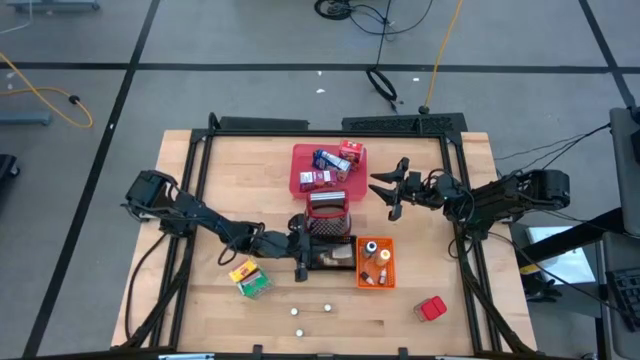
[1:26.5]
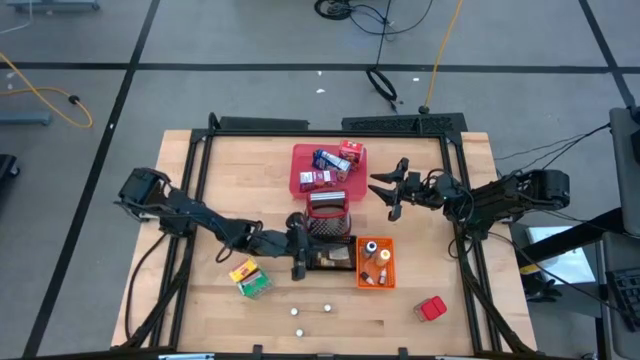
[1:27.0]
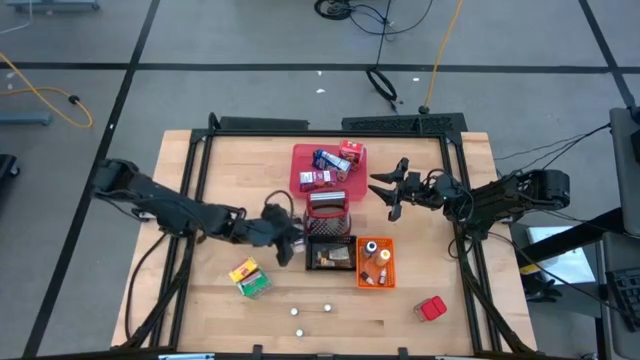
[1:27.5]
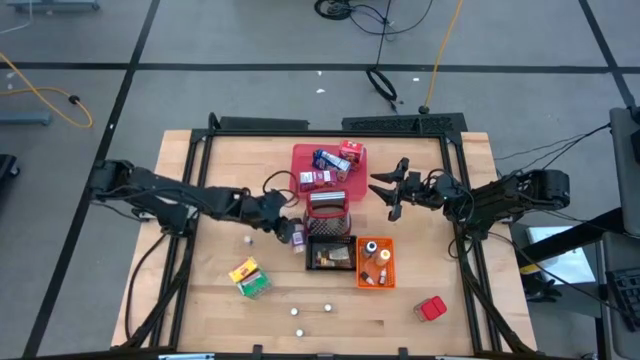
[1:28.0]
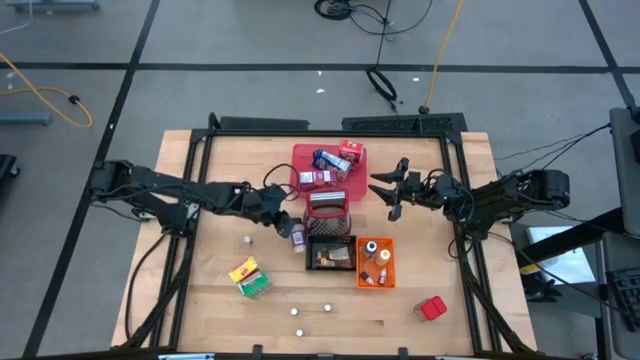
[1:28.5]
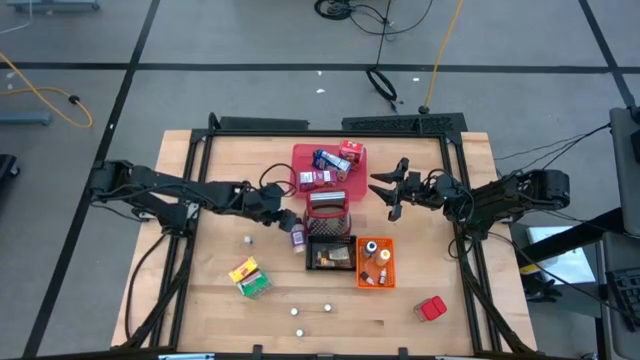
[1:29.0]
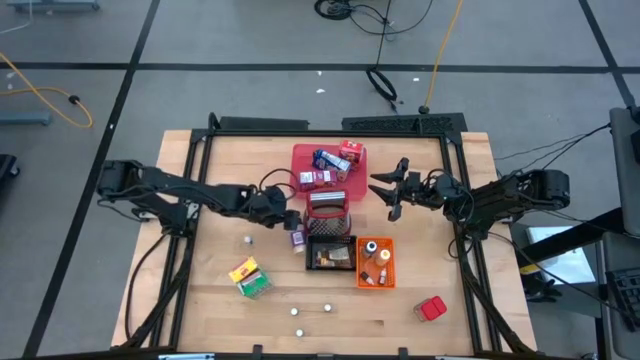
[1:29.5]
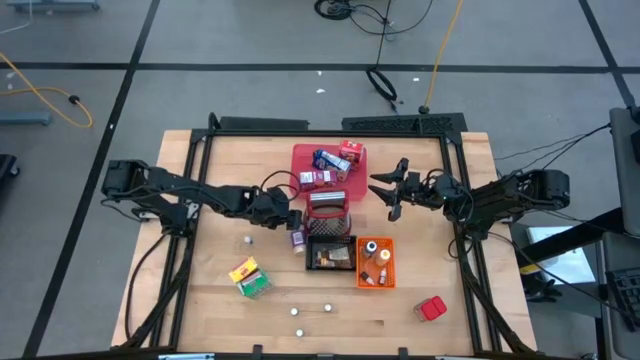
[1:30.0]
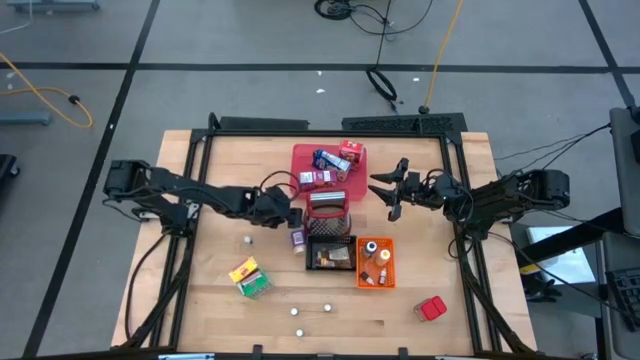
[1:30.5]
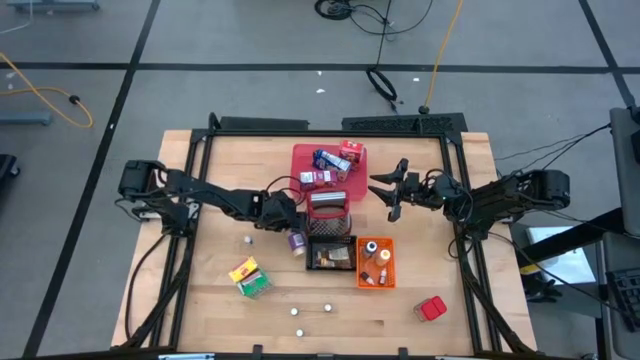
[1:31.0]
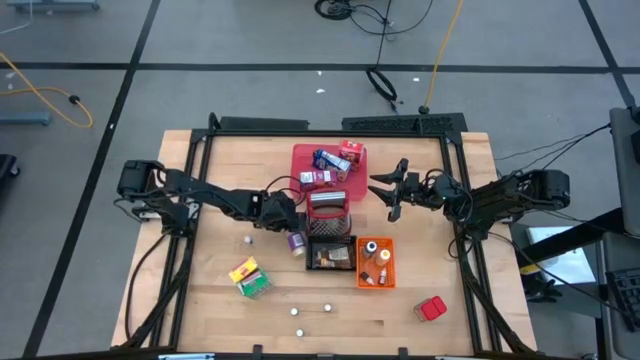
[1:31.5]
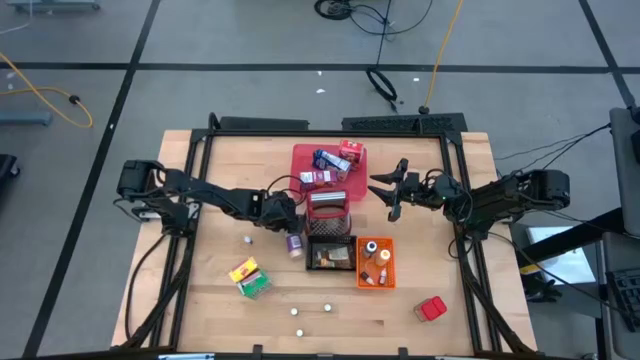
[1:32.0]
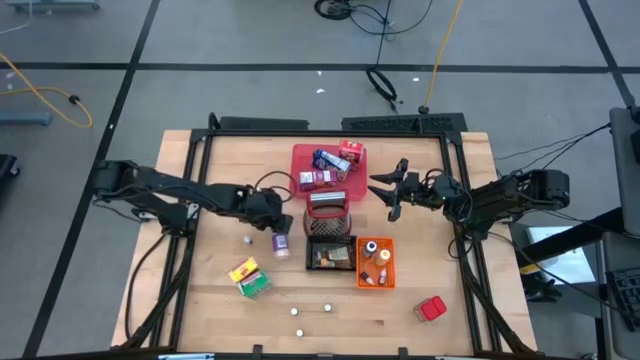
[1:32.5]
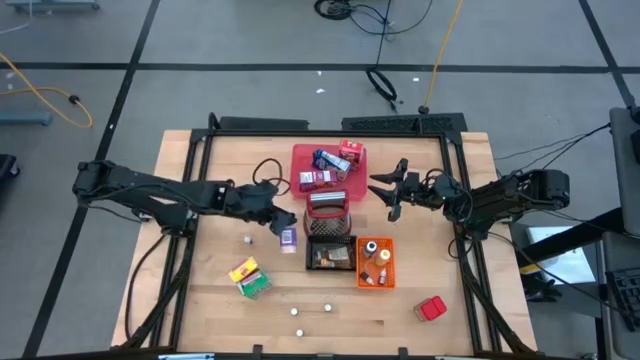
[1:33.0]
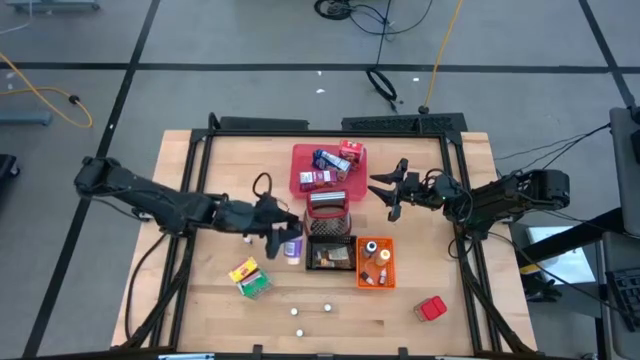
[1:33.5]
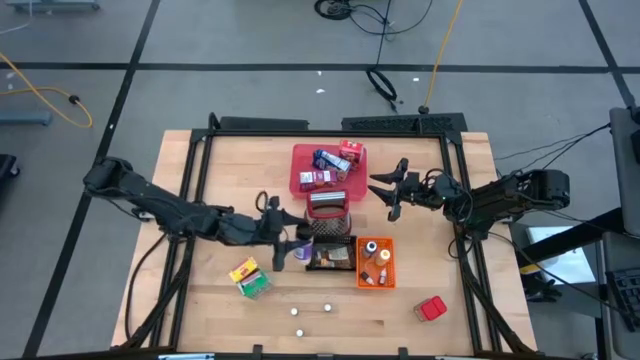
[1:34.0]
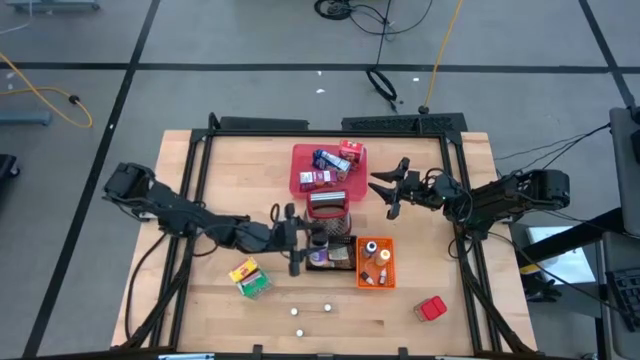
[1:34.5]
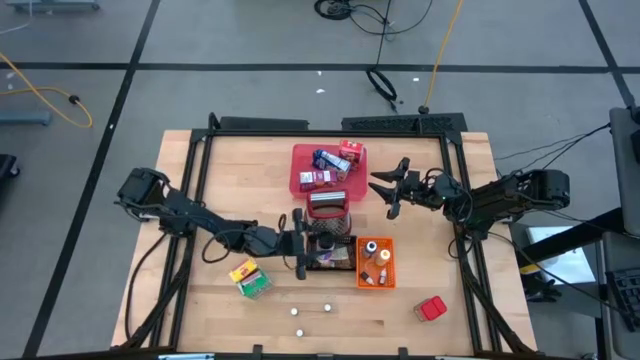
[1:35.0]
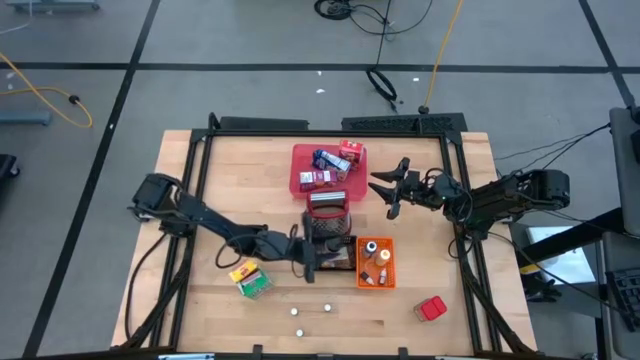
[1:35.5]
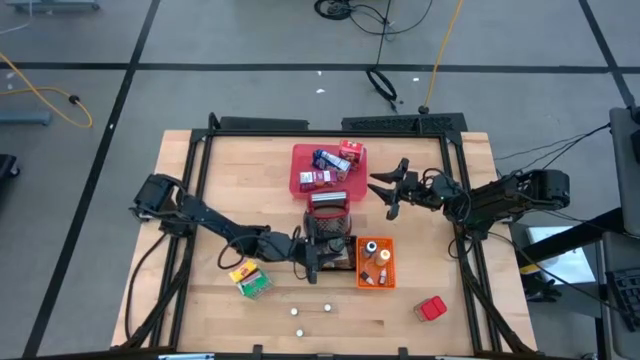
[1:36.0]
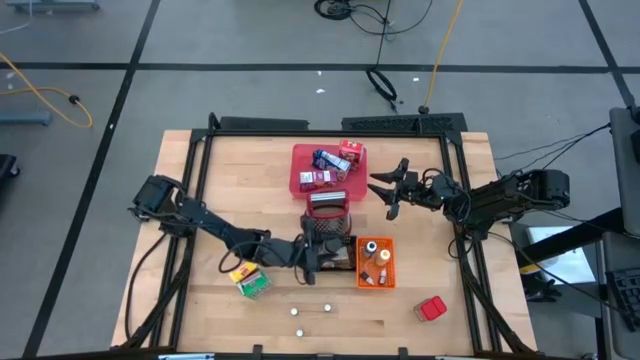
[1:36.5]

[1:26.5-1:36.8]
Task: Pick & Place Kitchen Items
Put the black seasoning bottle into the black bin

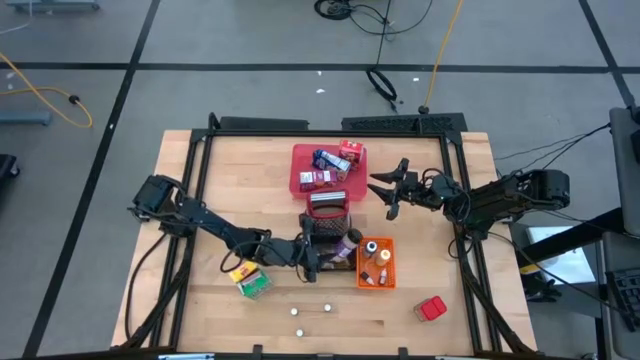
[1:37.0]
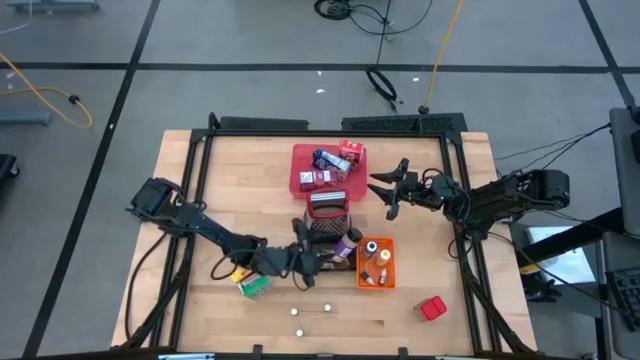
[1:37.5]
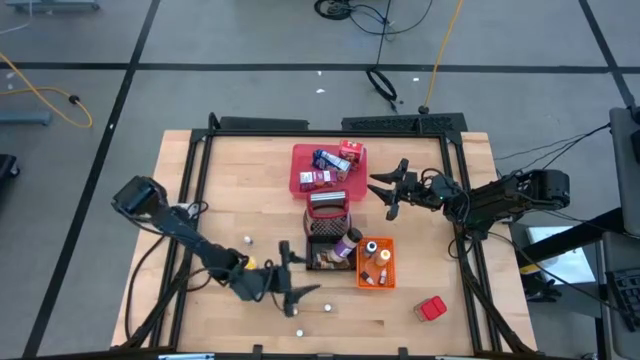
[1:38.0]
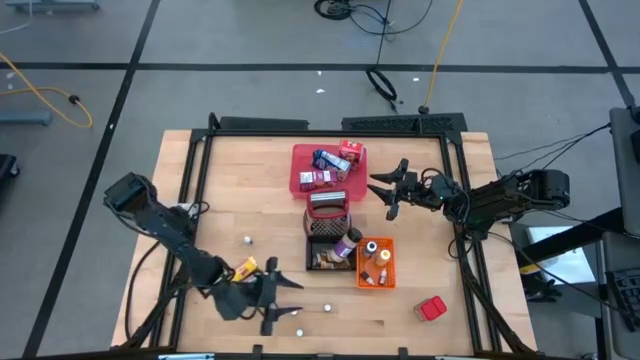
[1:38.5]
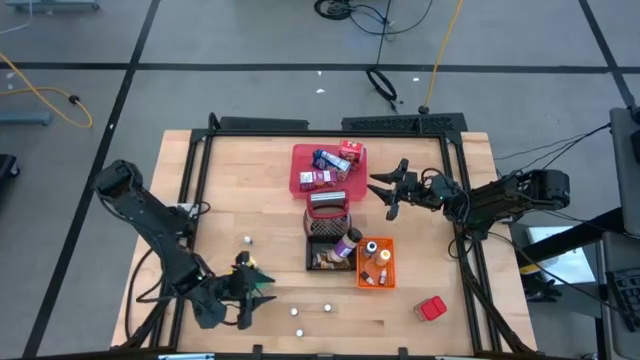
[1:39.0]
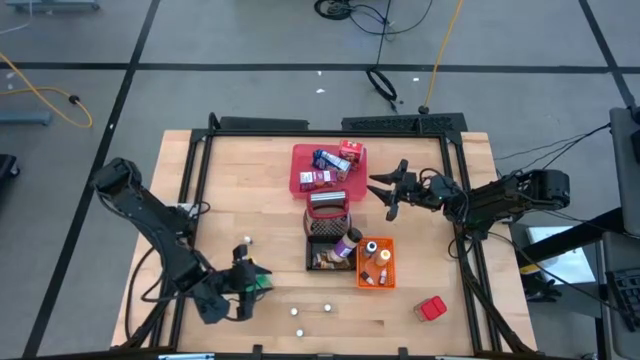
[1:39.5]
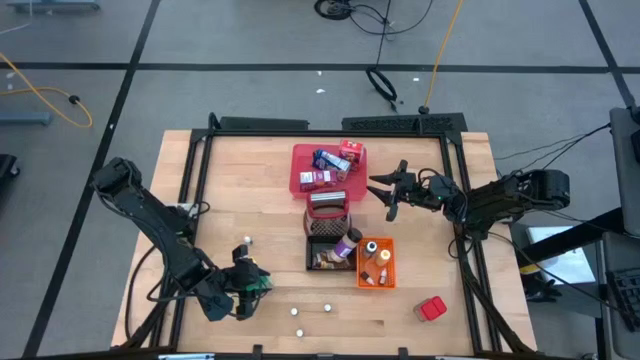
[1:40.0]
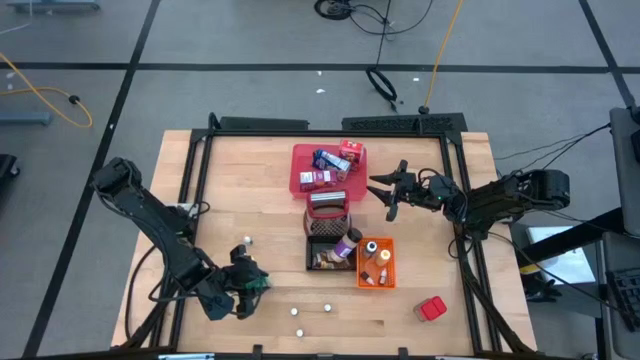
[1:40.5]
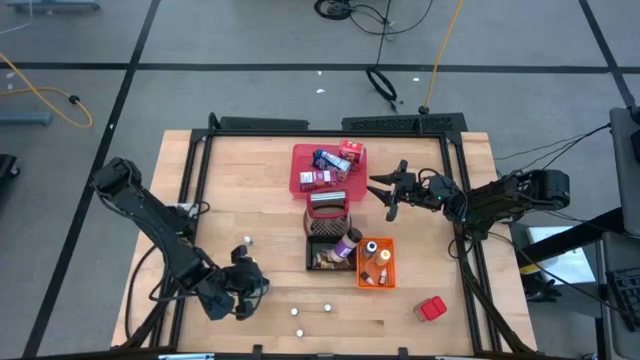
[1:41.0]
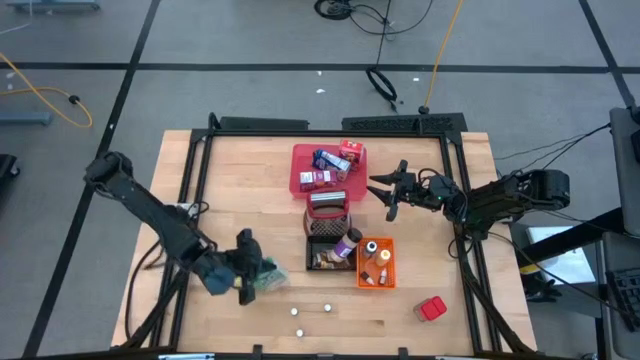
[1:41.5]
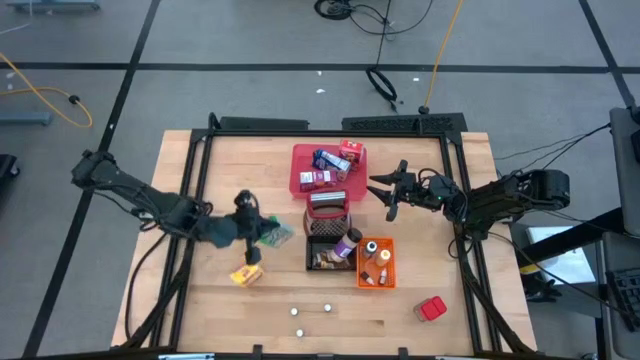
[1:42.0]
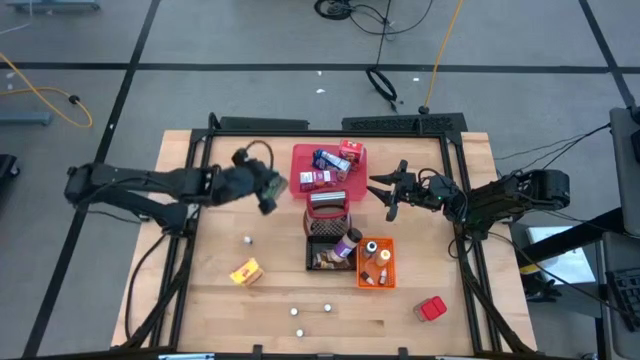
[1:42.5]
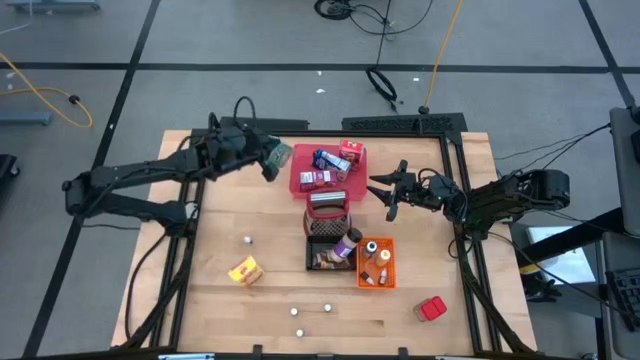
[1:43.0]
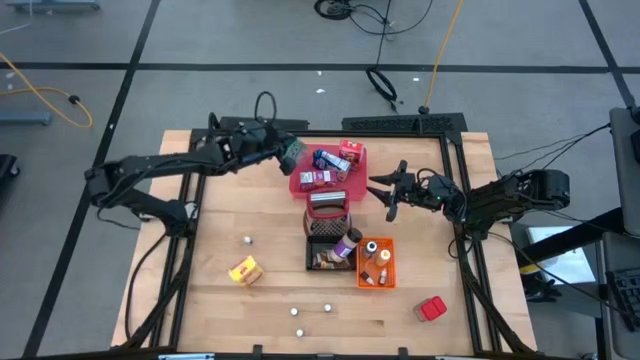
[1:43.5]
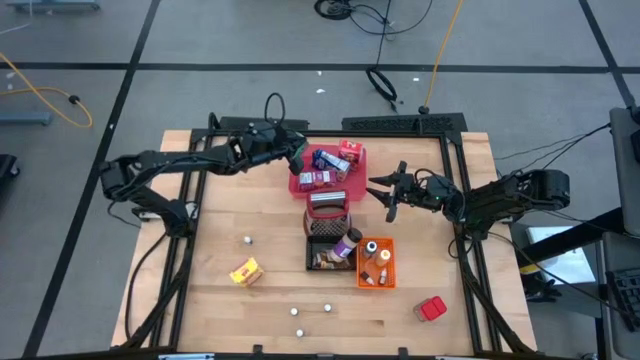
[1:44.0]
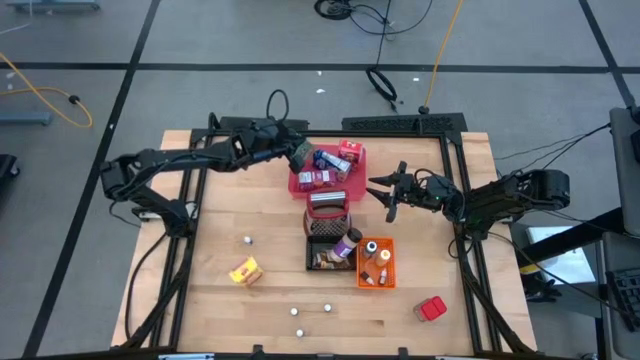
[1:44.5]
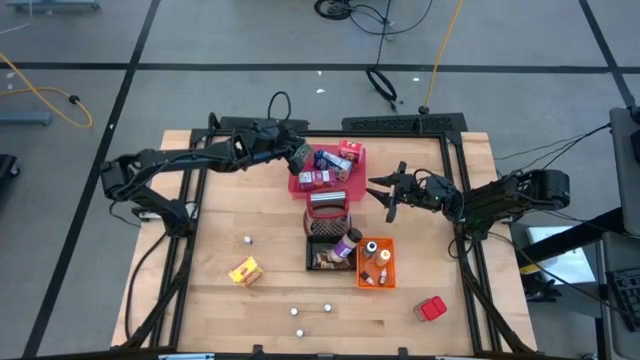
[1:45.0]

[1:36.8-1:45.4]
Put the green cereal box into the red bin

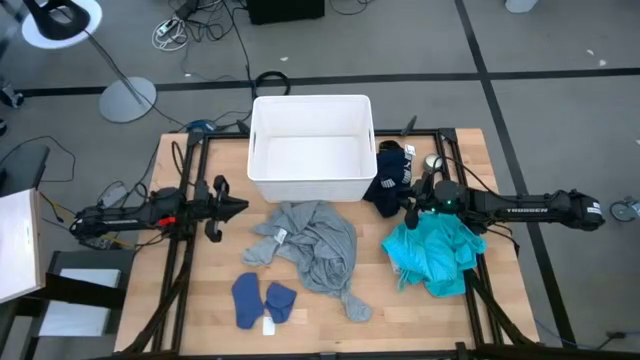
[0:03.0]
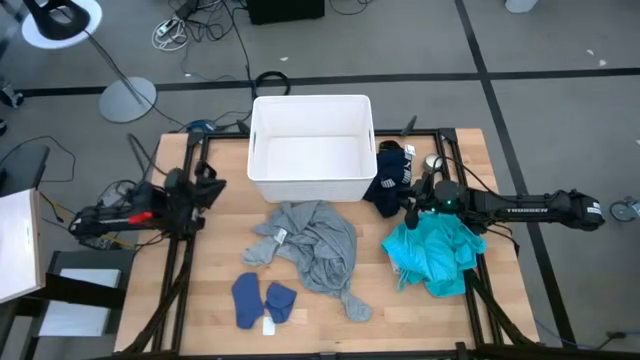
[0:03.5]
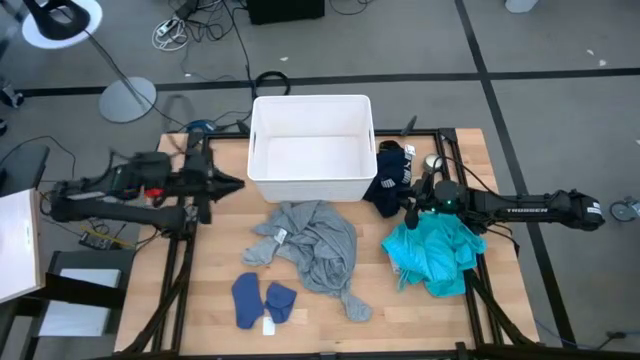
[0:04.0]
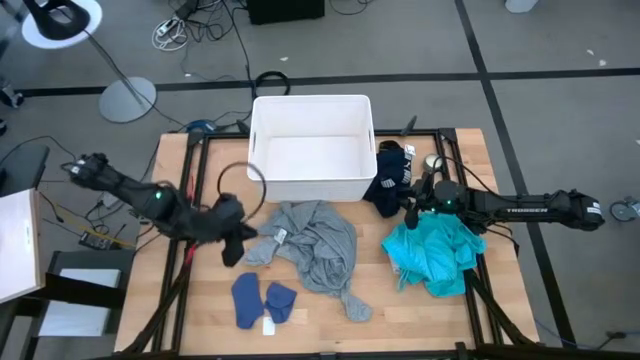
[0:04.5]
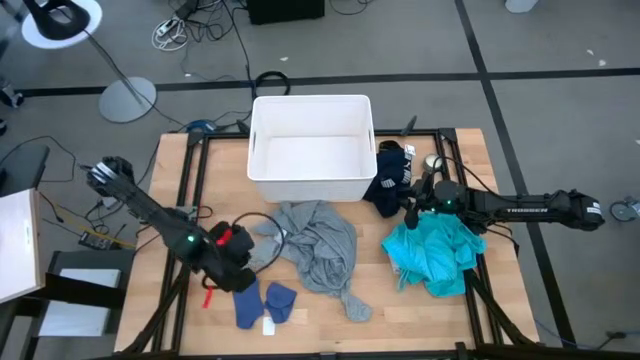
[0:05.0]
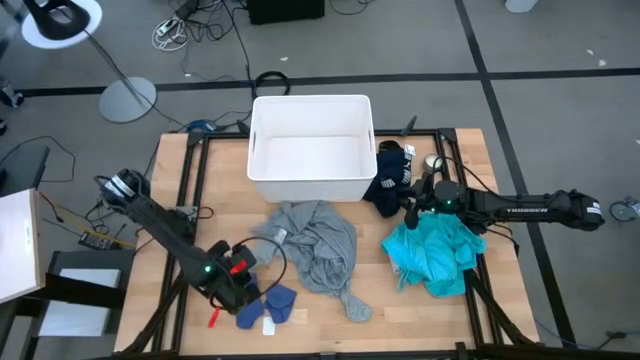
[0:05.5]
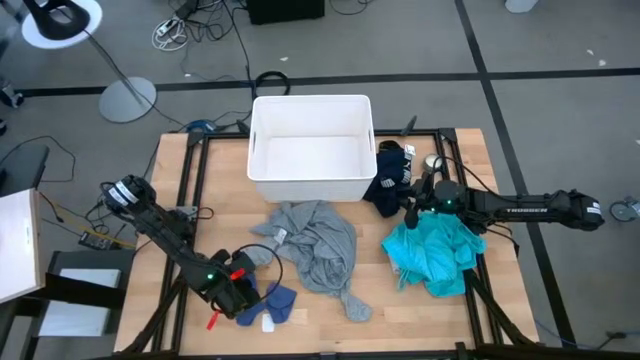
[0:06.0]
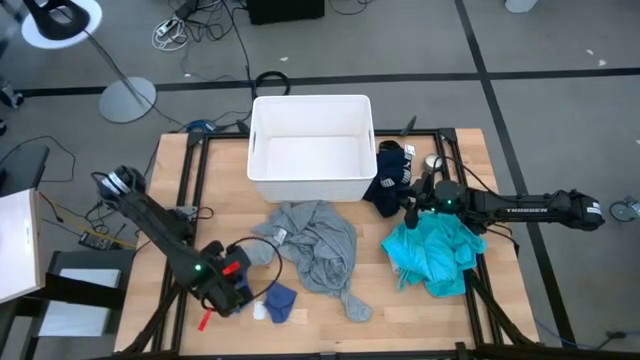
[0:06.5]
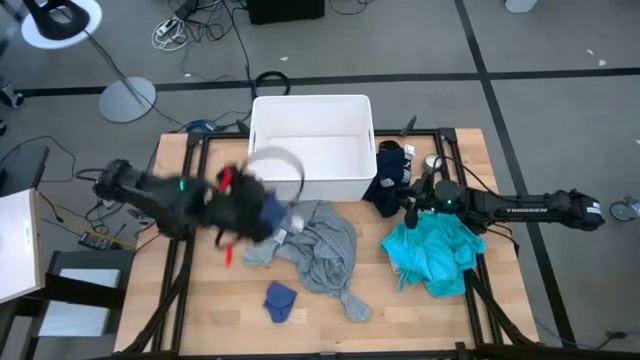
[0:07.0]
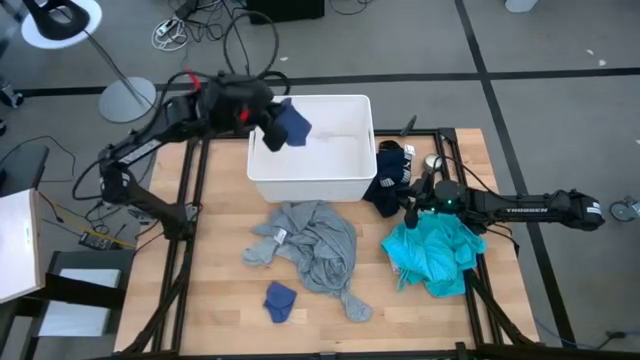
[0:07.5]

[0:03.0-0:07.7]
Task: Sort clothes
Put the left blue sock into the white laundry bin
